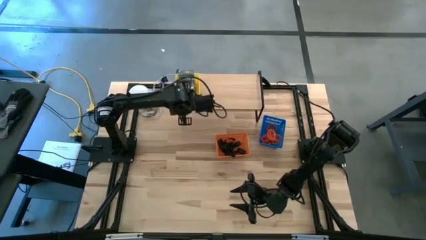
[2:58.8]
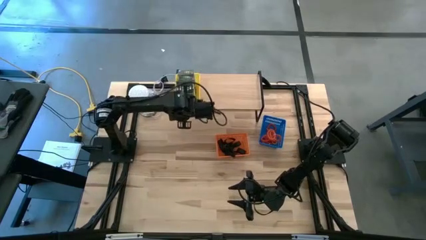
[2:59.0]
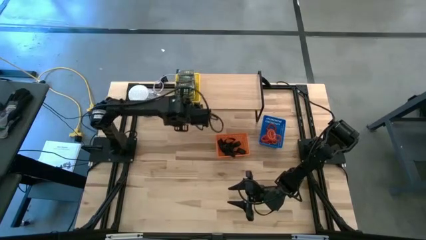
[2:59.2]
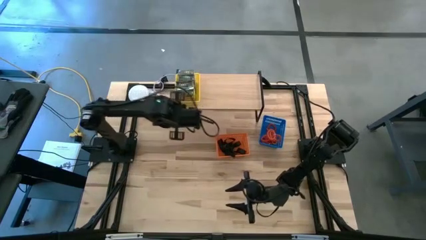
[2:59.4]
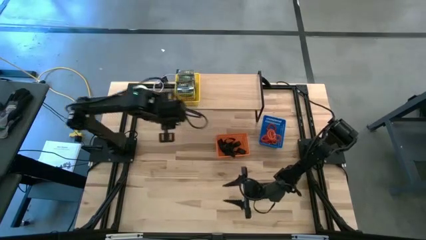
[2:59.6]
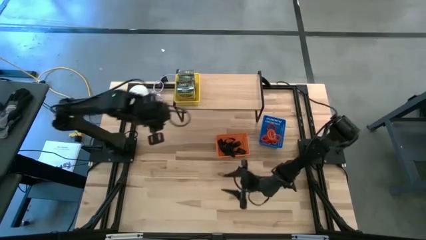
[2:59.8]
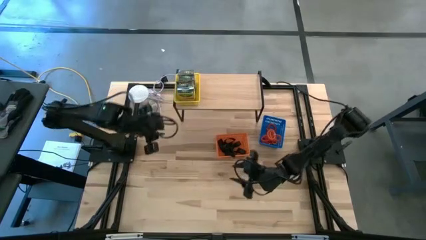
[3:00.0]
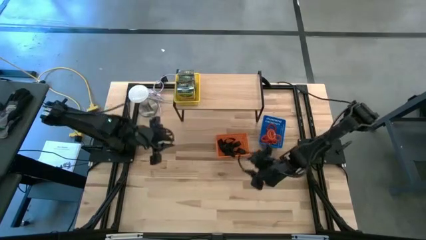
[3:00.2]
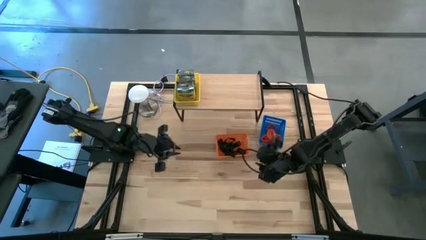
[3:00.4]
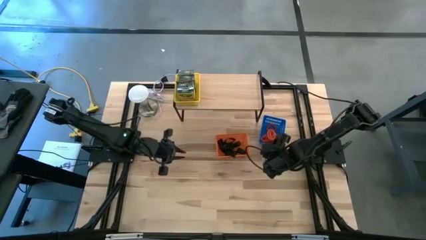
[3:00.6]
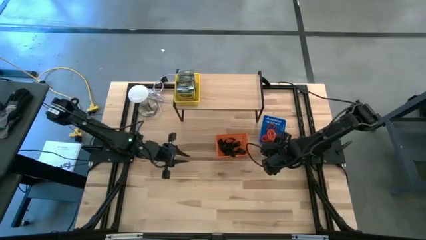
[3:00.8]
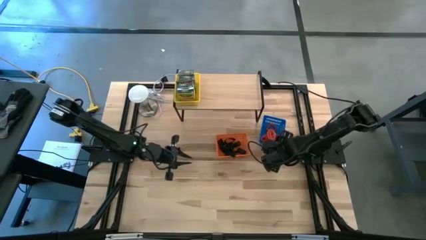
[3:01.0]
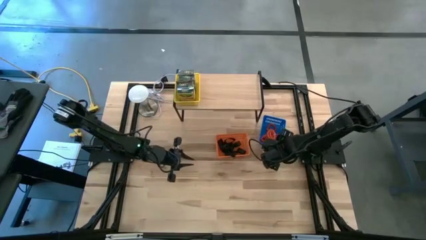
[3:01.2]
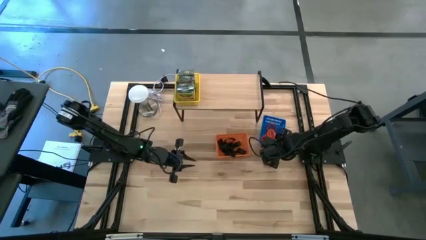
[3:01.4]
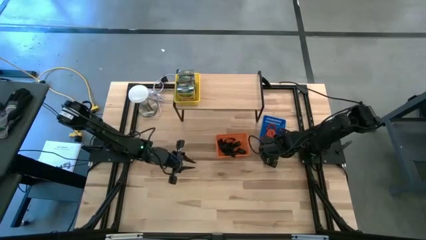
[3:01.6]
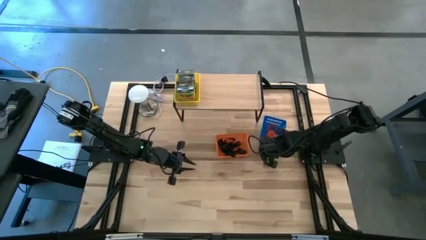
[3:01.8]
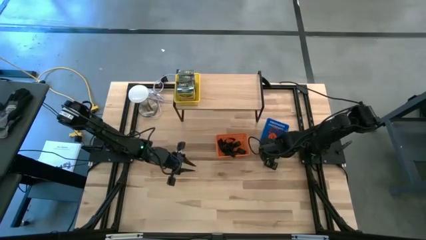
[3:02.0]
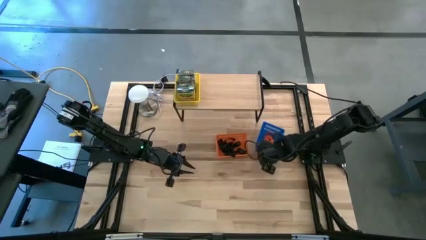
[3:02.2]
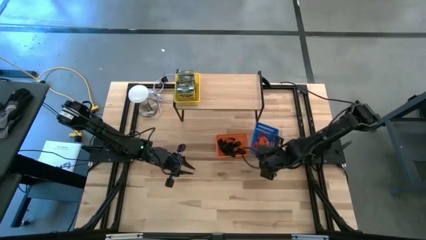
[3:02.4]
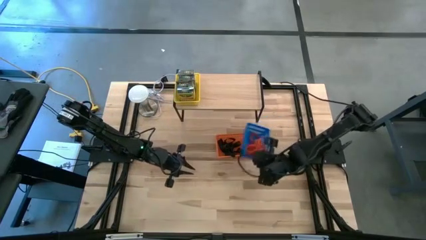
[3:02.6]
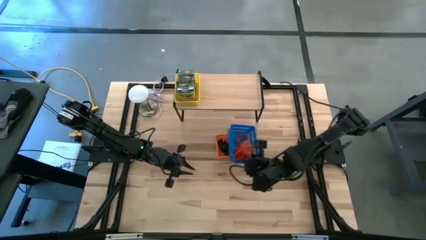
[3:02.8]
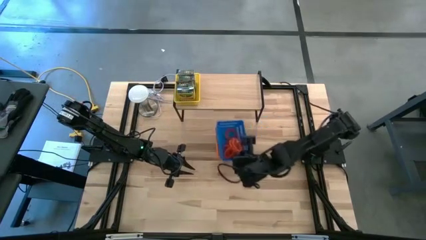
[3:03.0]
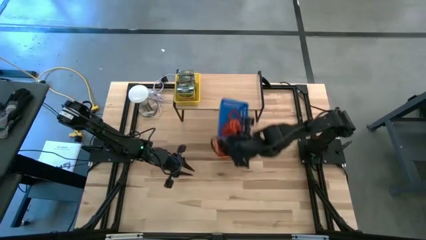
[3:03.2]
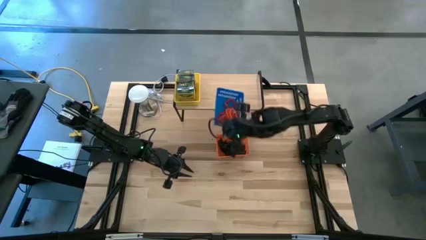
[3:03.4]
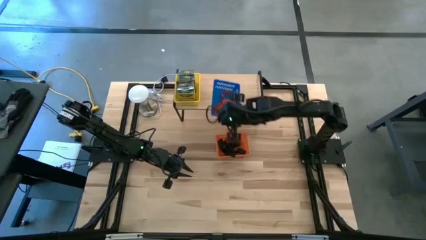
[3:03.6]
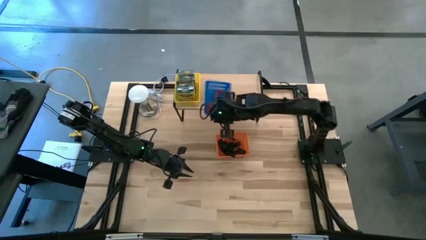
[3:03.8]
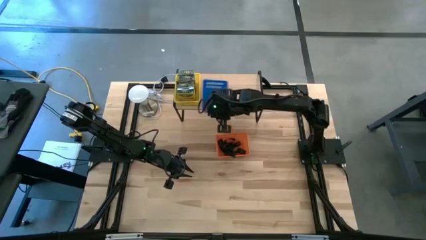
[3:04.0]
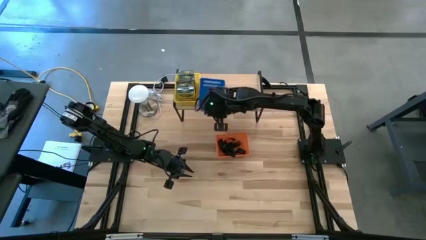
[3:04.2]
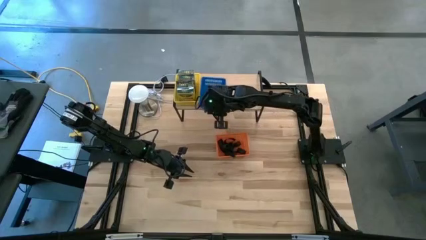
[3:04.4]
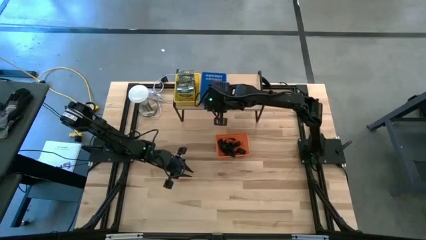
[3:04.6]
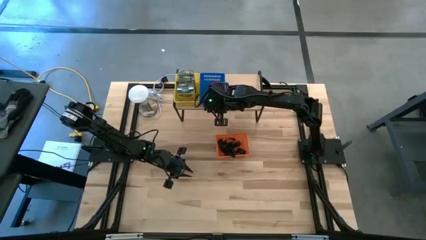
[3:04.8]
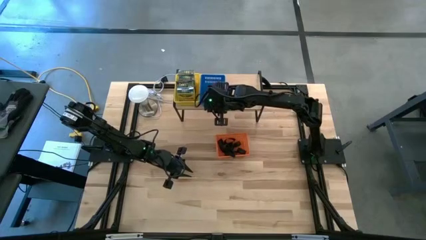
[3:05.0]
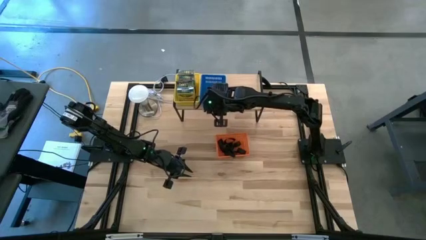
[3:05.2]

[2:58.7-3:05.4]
Task: Pick & Place Office Desk Supplies
Put the blue bin with spring keychains on the shelf

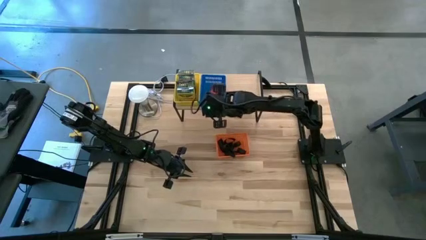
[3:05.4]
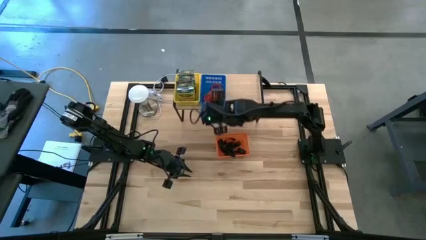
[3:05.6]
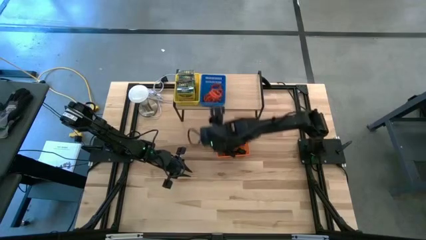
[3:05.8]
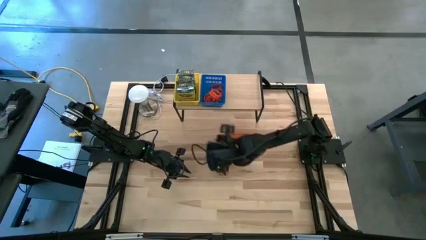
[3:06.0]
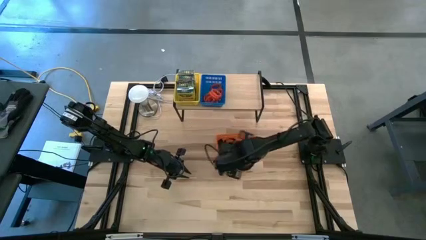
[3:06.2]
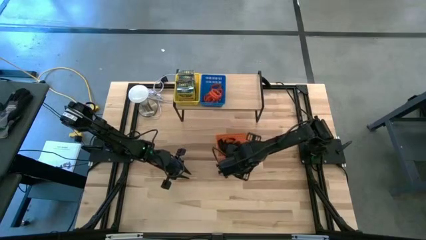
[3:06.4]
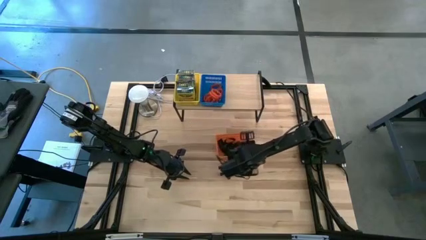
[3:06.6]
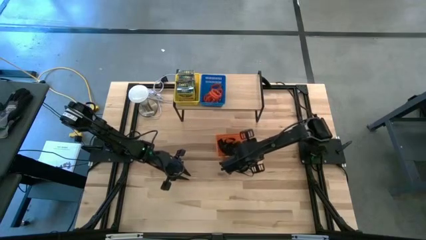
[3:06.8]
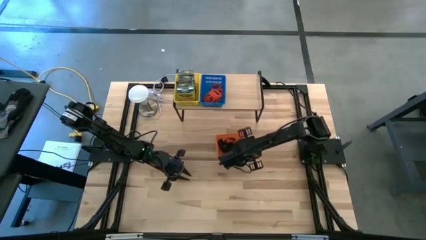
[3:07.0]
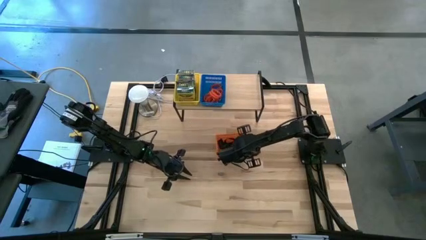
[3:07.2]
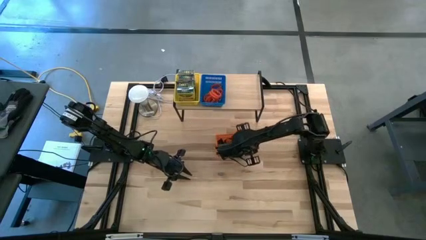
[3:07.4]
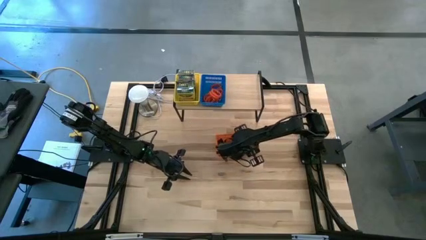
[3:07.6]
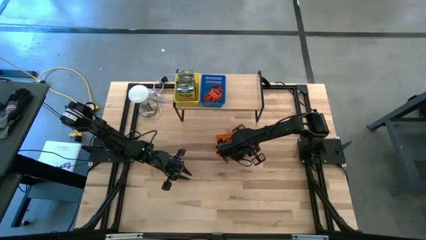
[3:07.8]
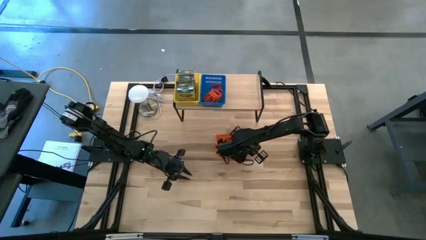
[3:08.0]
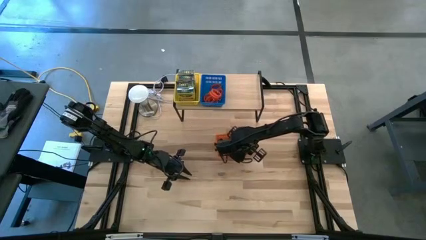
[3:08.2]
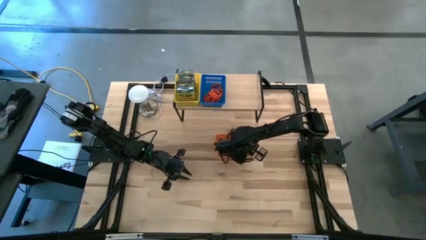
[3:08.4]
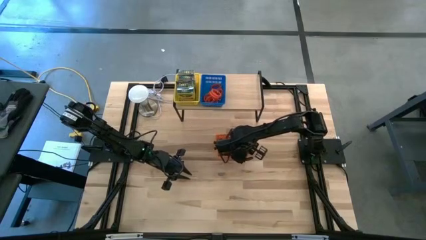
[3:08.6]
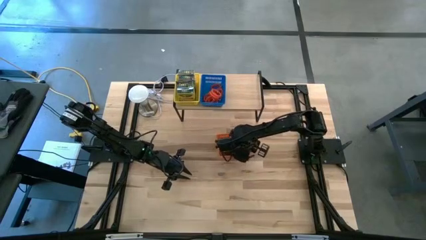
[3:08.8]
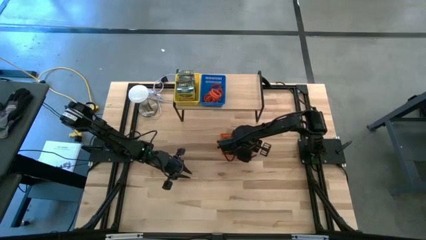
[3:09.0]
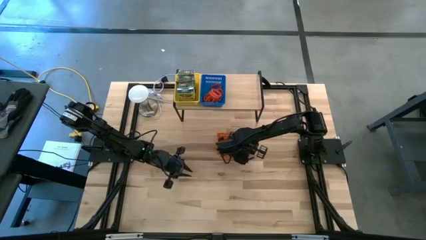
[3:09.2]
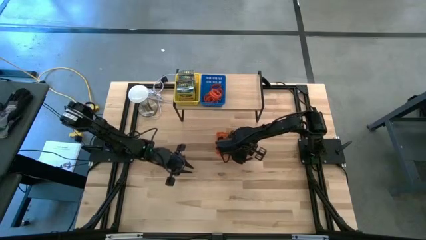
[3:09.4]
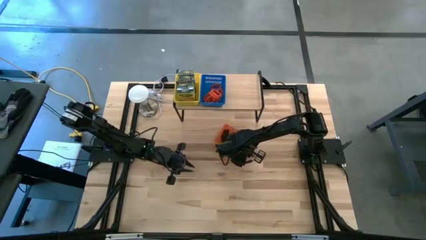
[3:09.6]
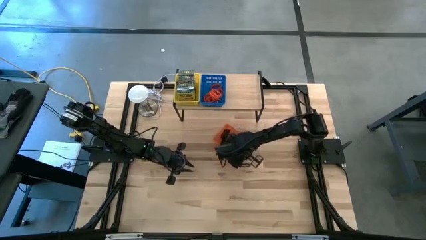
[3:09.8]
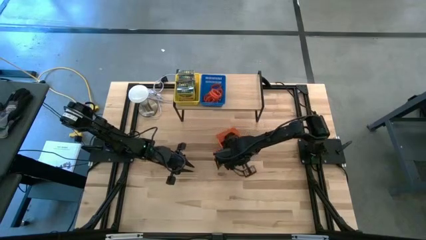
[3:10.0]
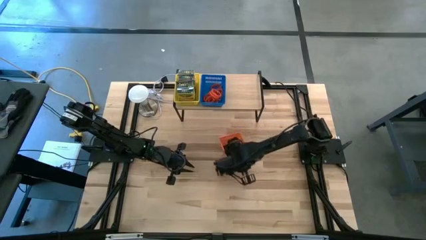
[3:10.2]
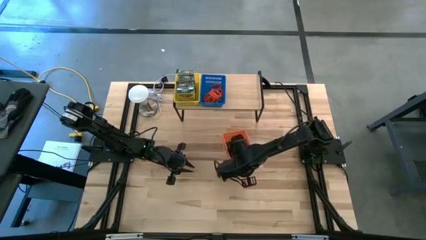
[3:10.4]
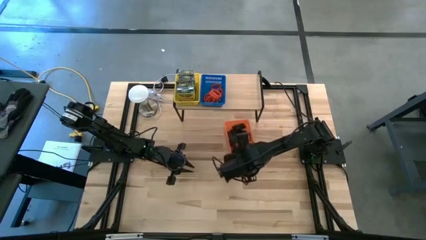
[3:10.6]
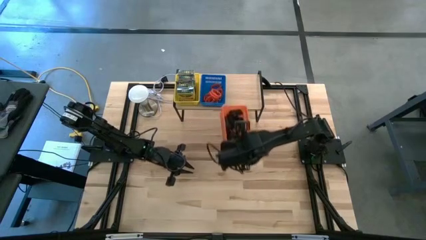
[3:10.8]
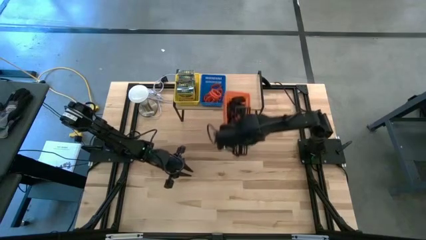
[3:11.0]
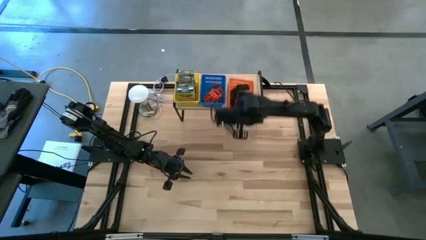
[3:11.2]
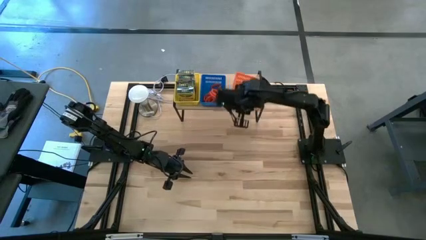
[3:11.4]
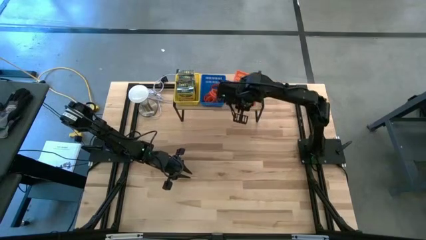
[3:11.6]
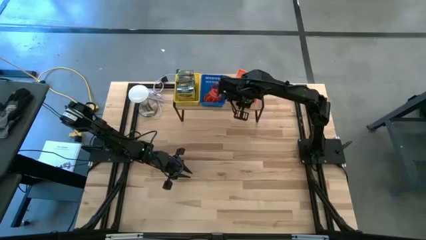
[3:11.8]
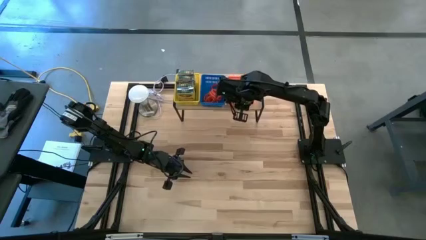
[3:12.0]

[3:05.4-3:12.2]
Put the orange bin with rubber bands on the shelf
